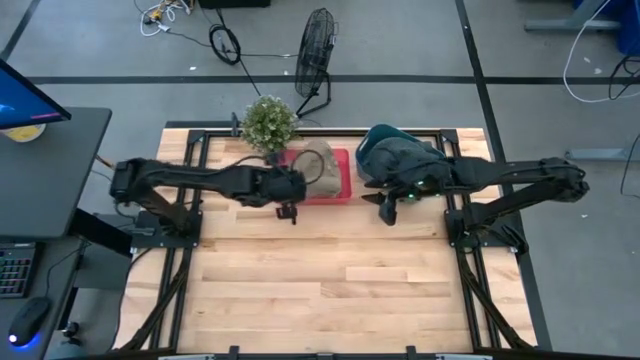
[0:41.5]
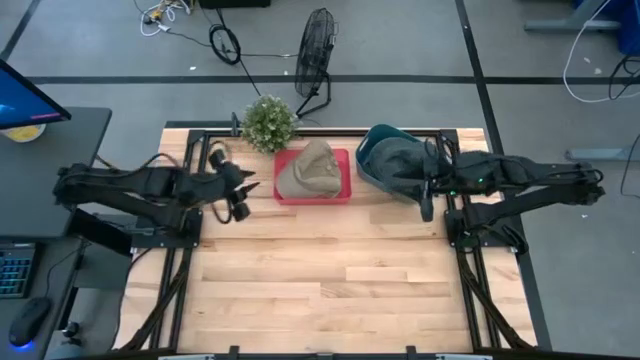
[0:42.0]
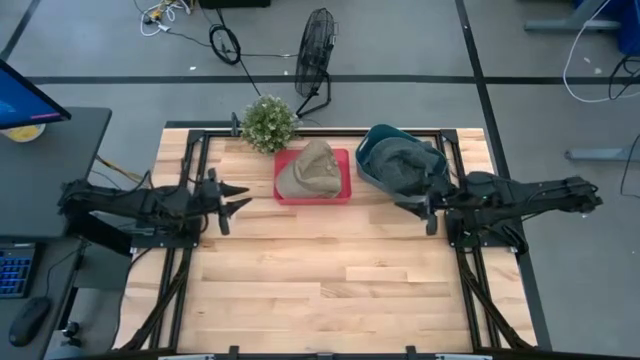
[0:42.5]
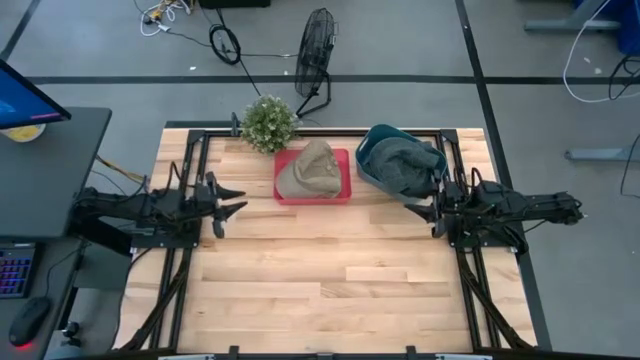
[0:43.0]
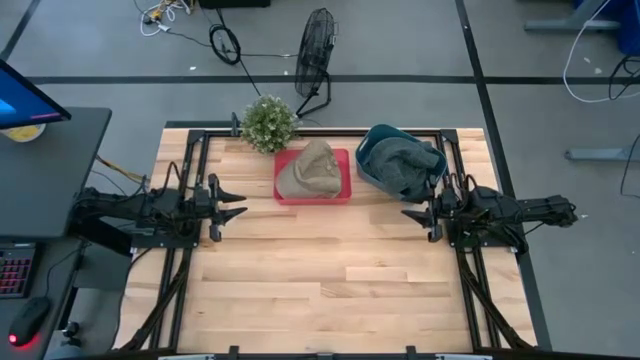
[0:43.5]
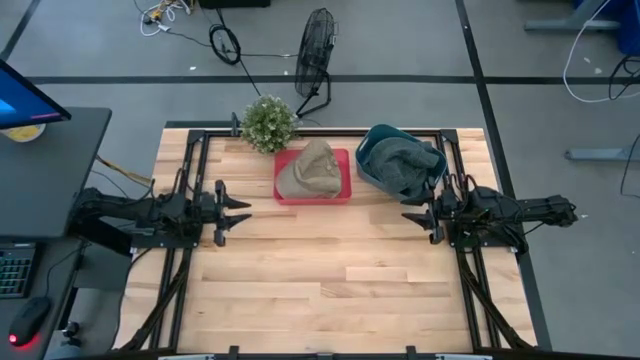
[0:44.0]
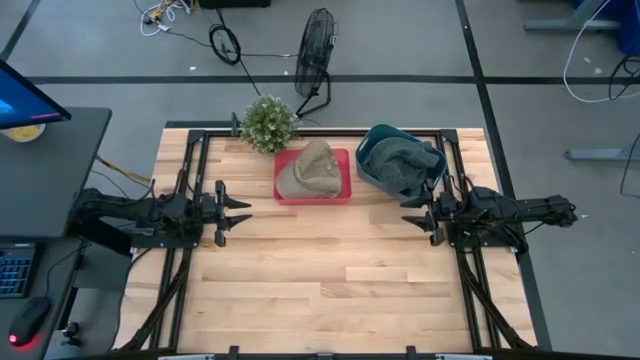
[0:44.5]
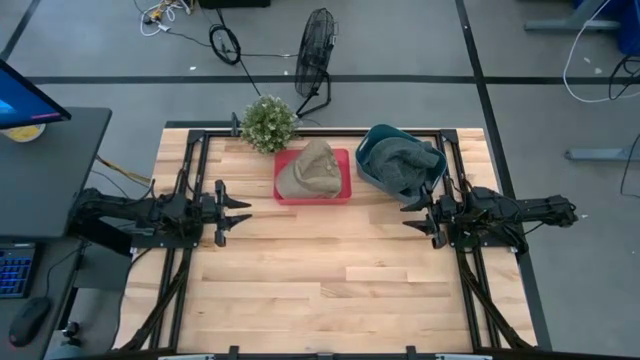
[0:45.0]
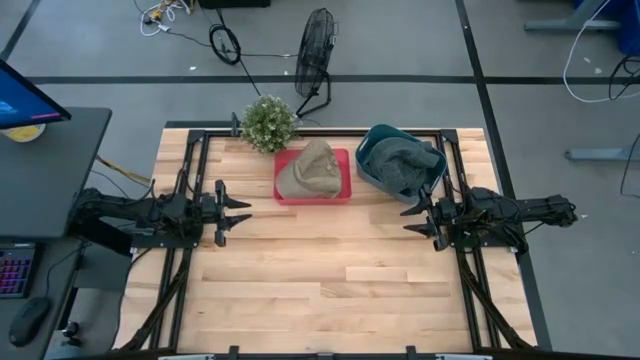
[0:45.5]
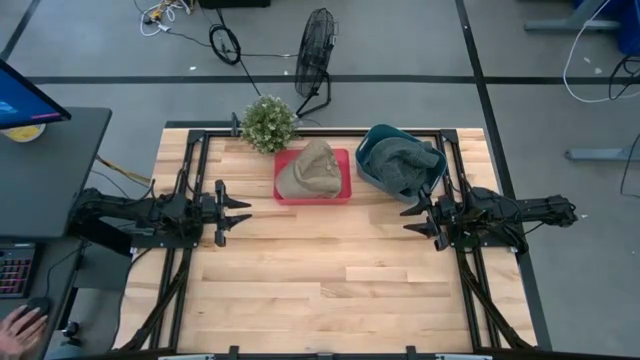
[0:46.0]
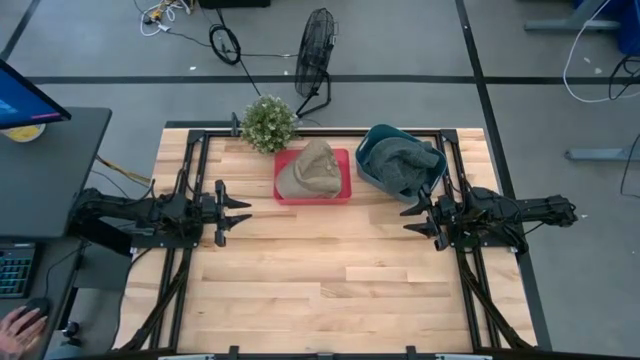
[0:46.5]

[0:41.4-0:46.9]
Task: Pick & Place hat
Return to Home position

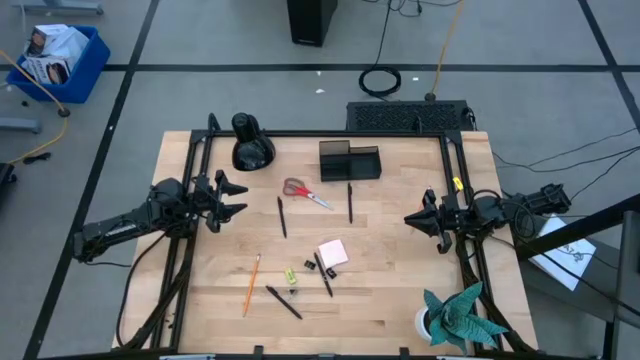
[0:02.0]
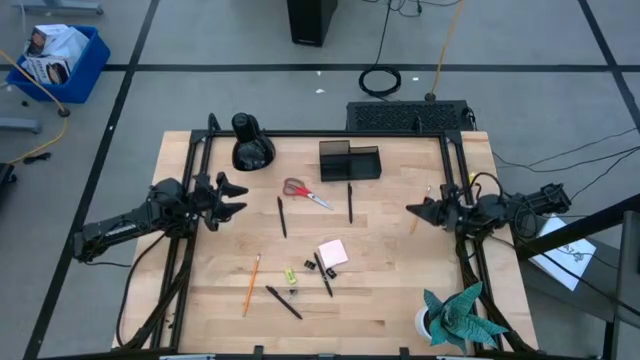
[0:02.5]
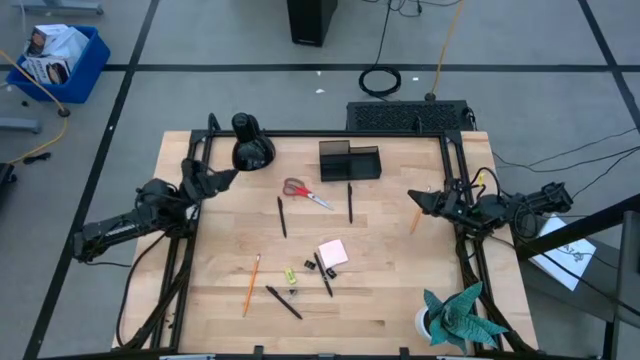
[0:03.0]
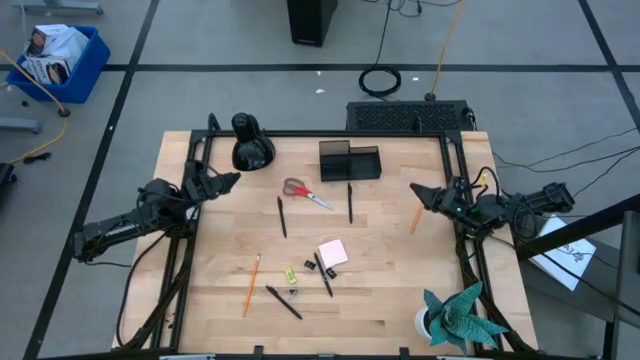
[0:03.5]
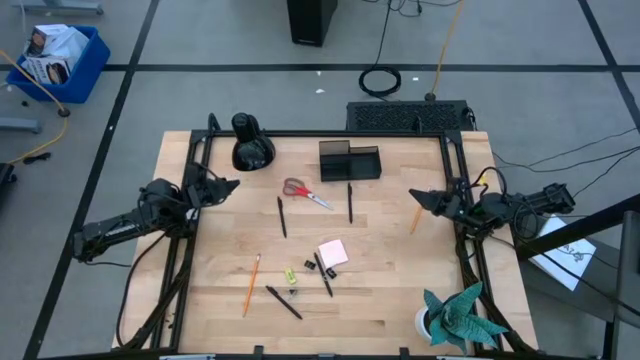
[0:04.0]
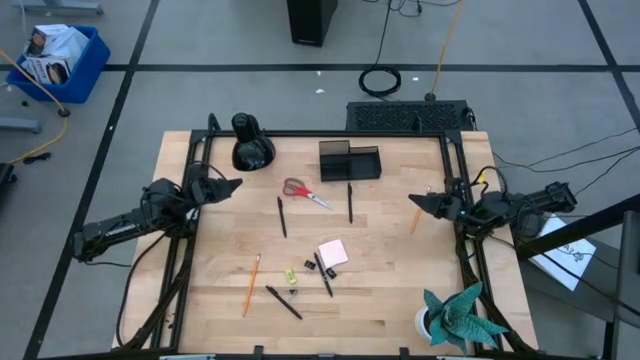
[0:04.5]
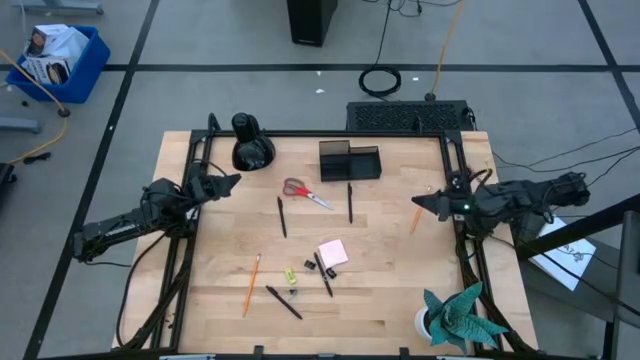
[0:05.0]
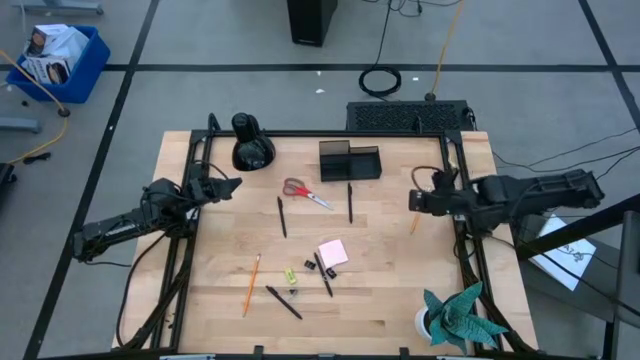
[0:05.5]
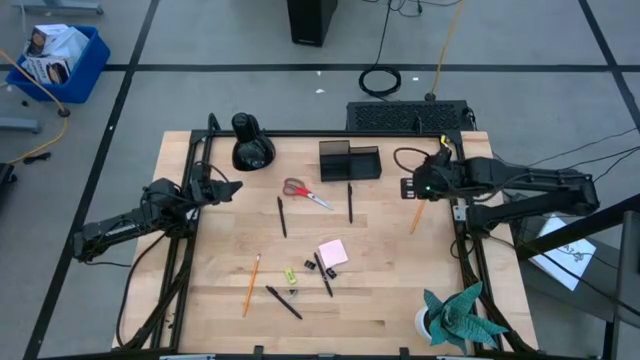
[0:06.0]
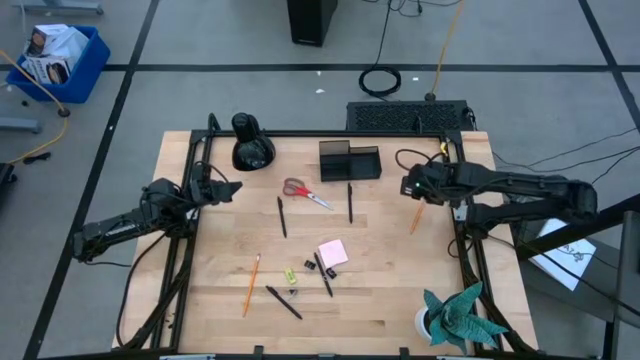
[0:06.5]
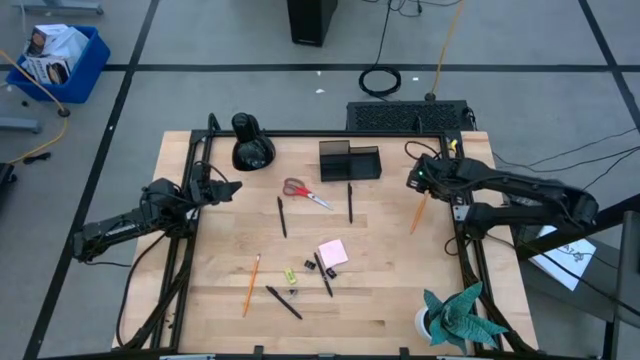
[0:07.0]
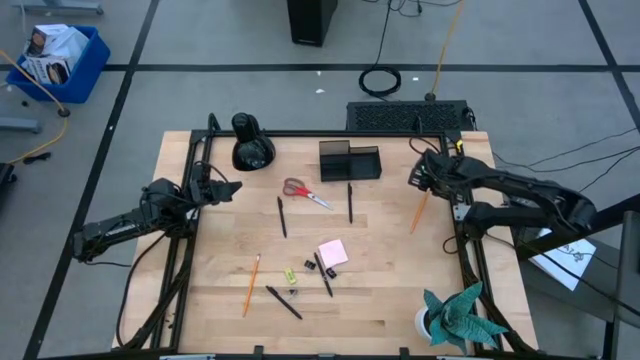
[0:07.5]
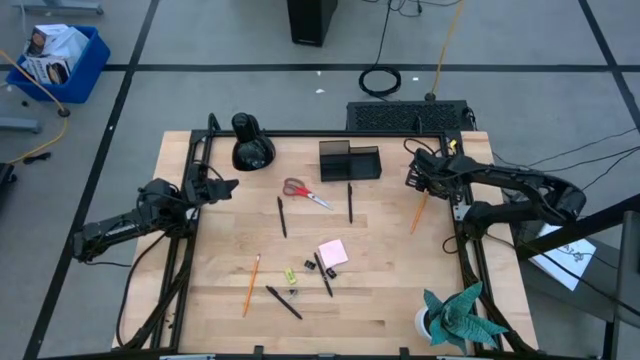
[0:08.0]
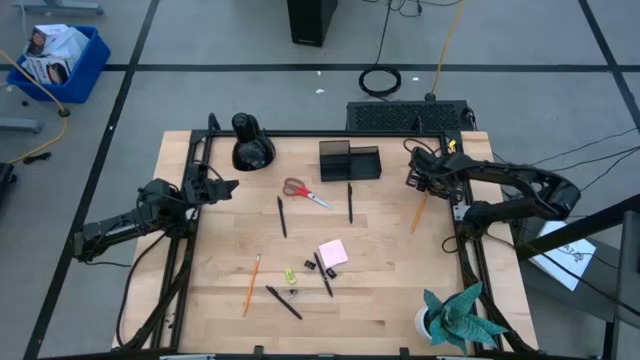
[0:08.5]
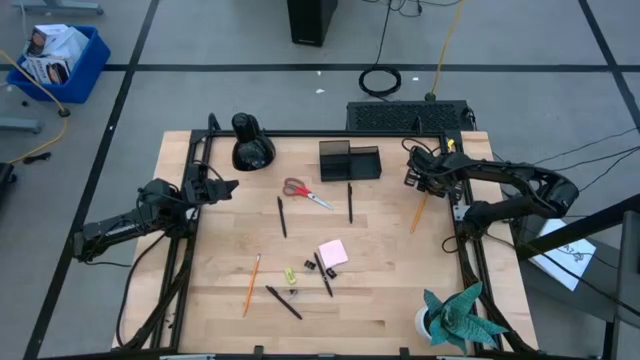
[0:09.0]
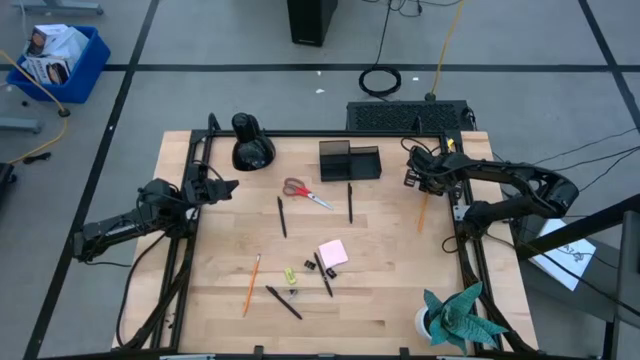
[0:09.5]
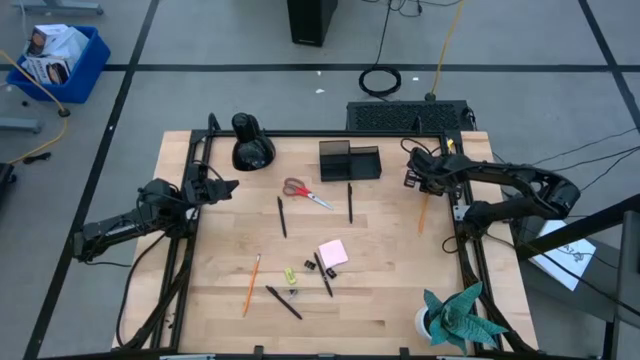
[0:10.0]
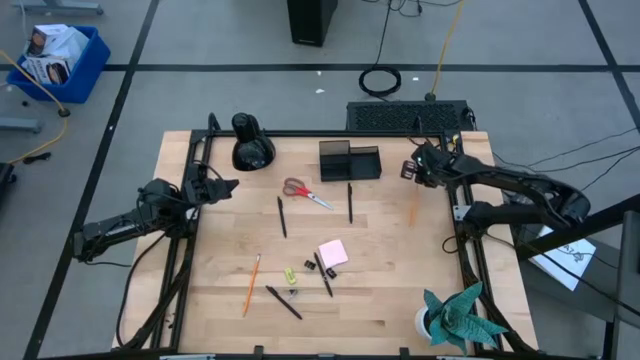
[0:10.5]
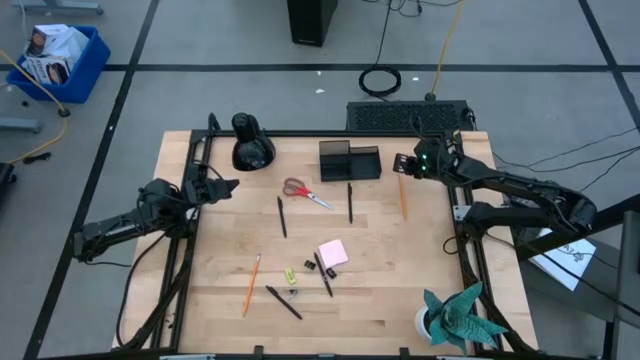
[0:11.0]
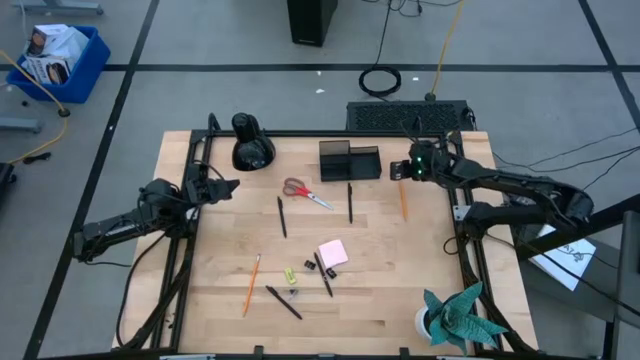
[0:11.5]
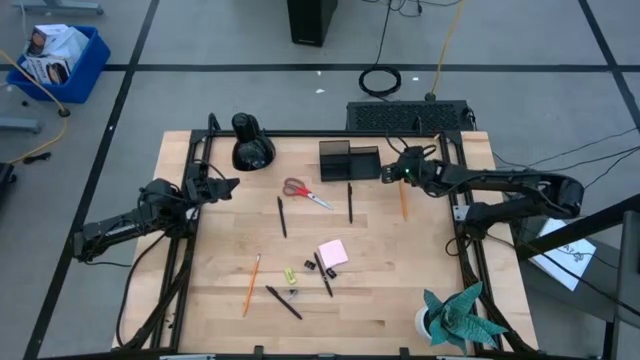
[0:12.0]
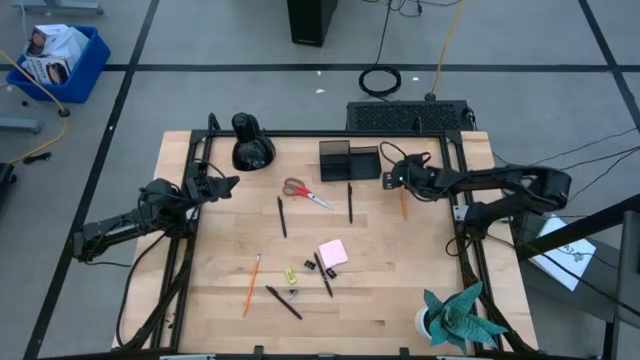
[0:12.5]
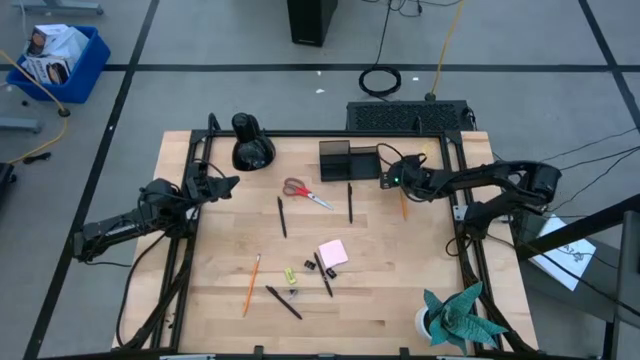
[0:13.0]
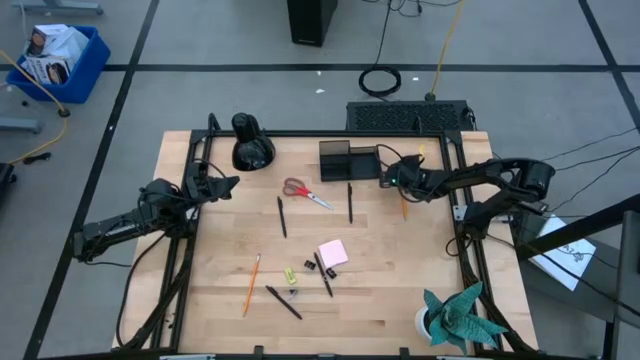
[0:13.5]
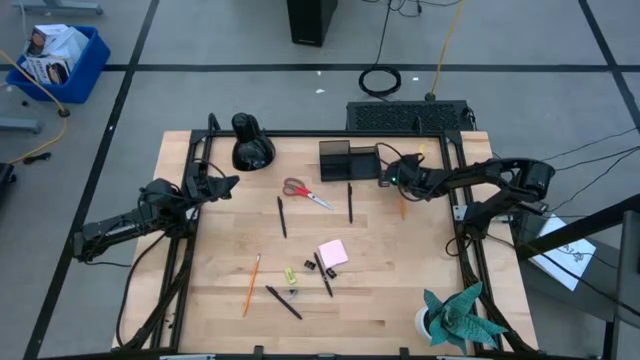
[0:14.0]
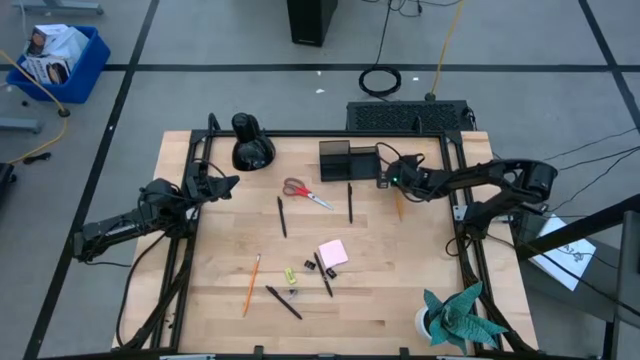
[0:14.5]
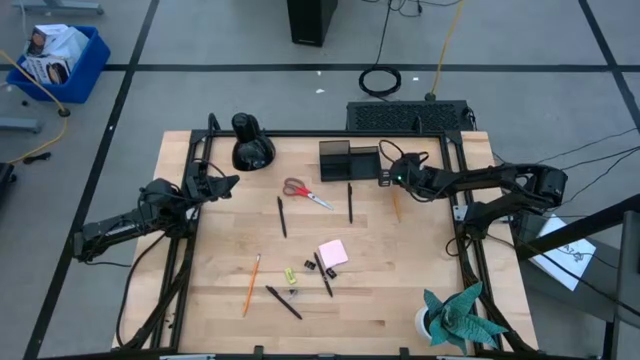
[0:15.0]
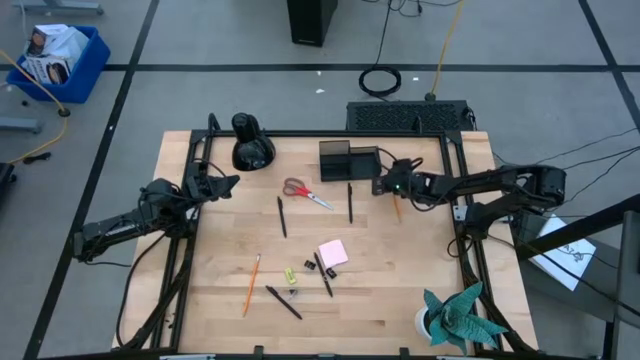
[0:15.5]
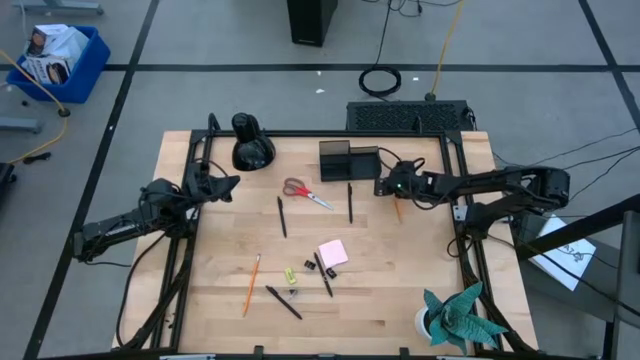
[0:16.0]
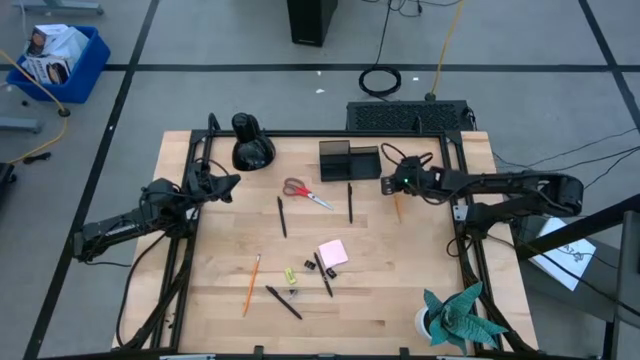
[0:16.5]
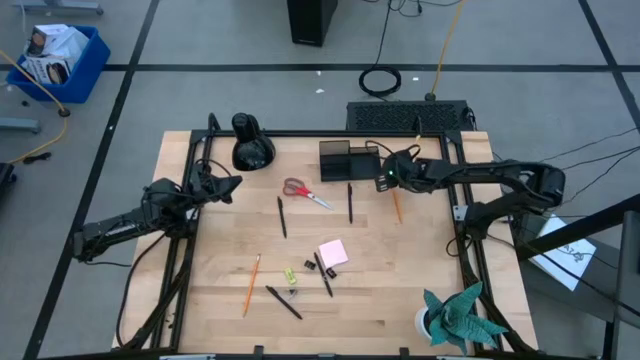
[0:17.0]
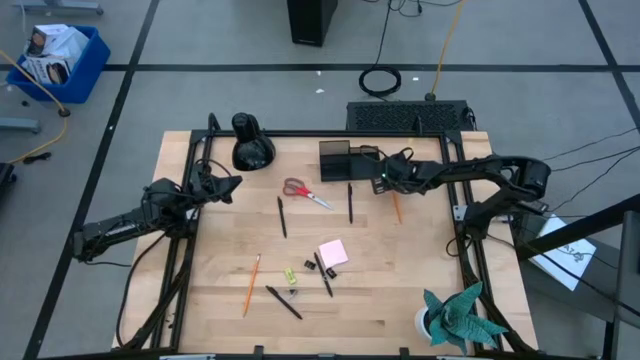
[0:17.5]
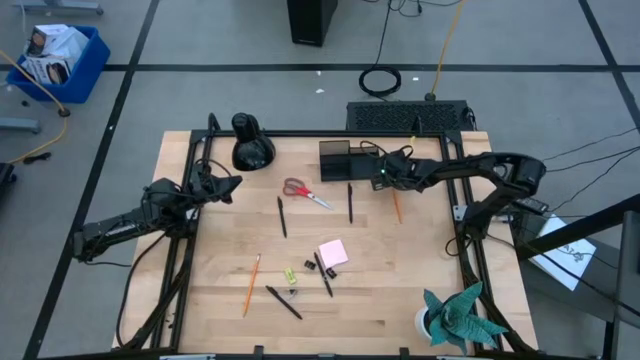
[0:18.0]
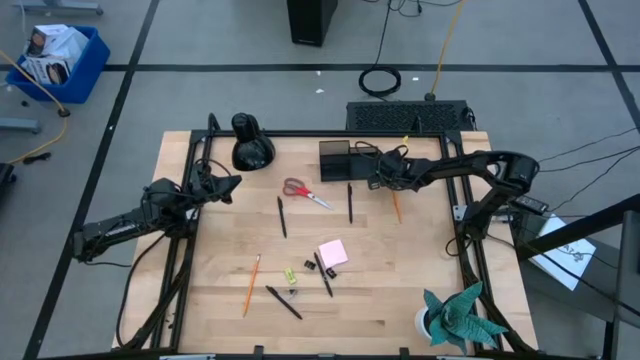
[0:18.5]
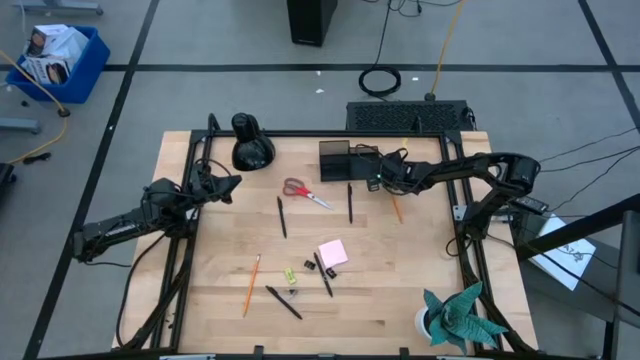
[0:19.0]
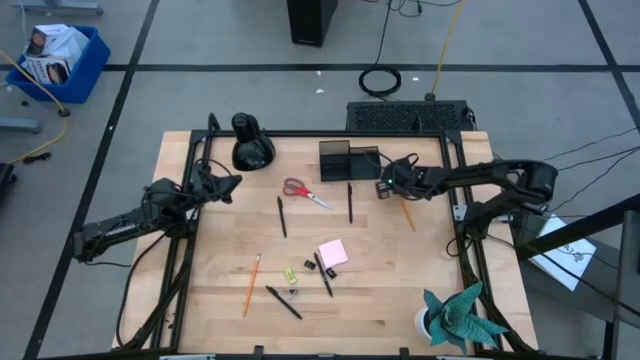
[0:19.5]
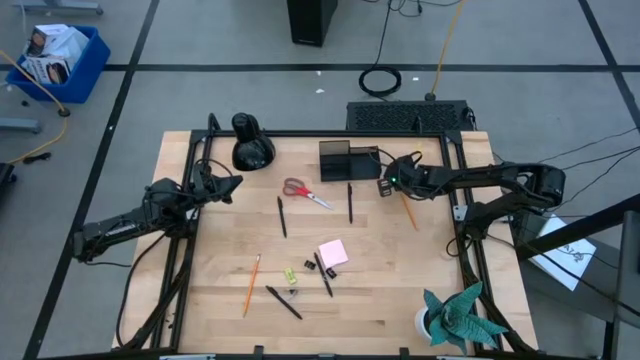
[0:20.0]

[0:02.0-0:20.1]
Task: Pick and place office supplies into organizer
Put the orange pencil into the black desk organizer
